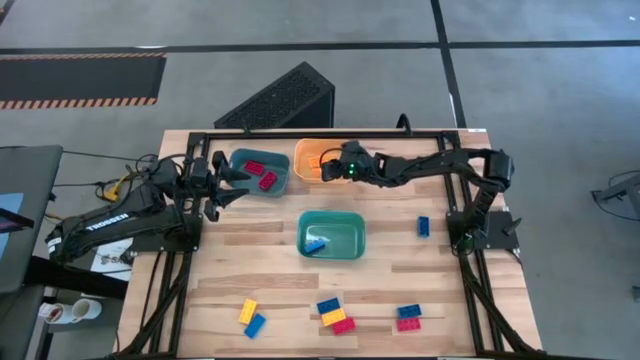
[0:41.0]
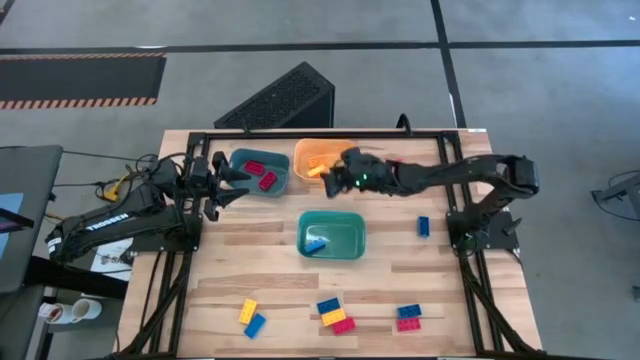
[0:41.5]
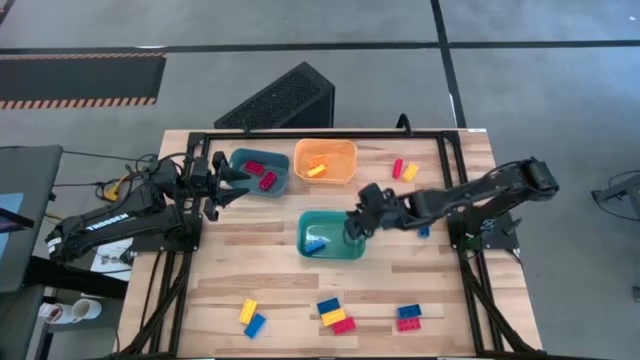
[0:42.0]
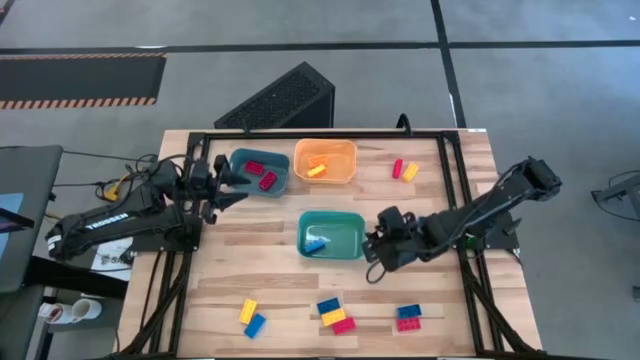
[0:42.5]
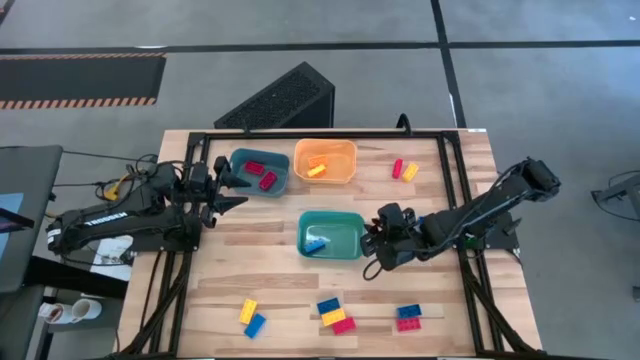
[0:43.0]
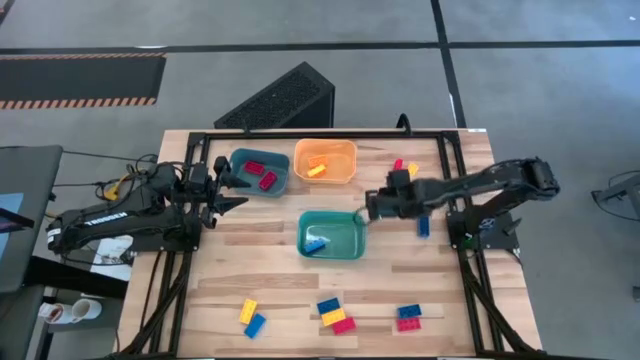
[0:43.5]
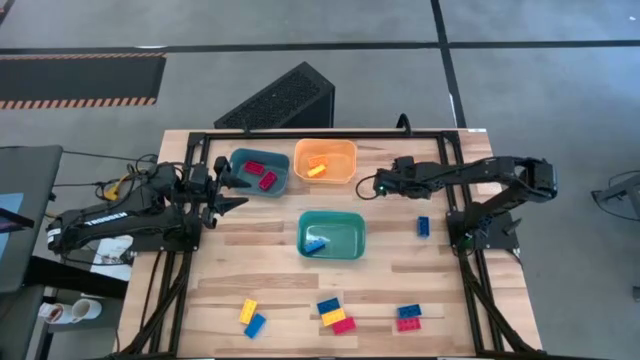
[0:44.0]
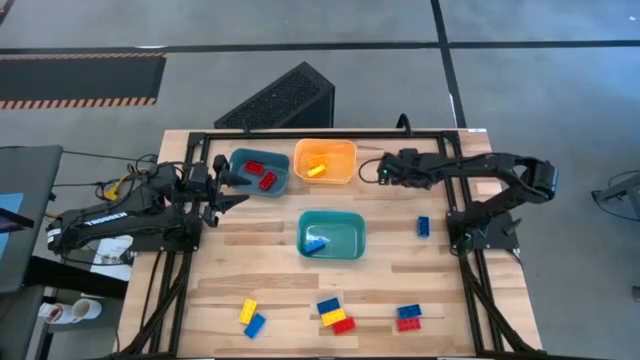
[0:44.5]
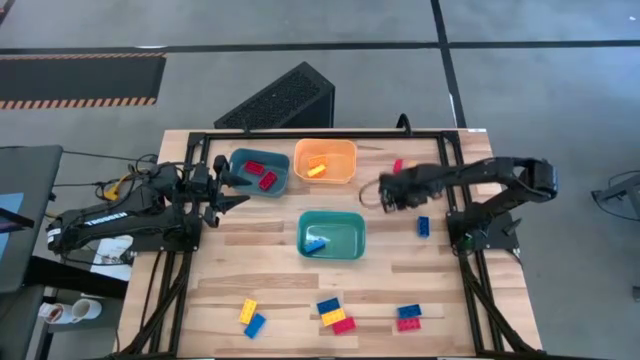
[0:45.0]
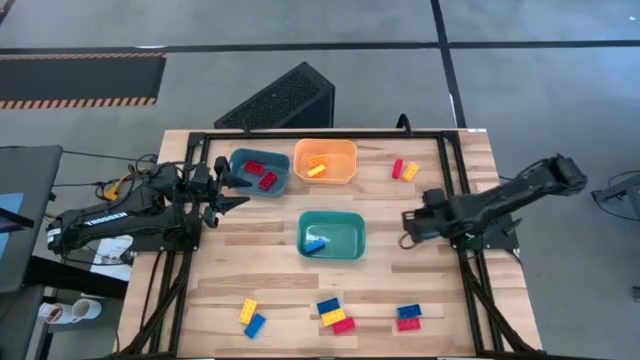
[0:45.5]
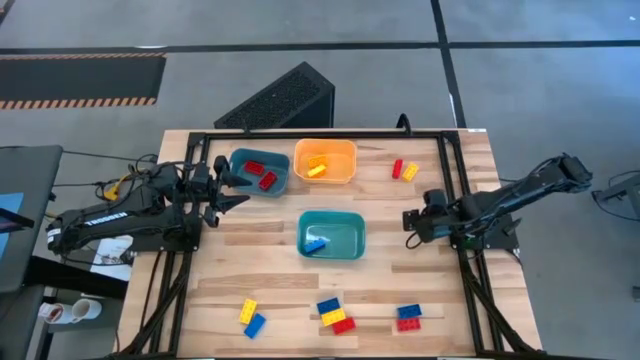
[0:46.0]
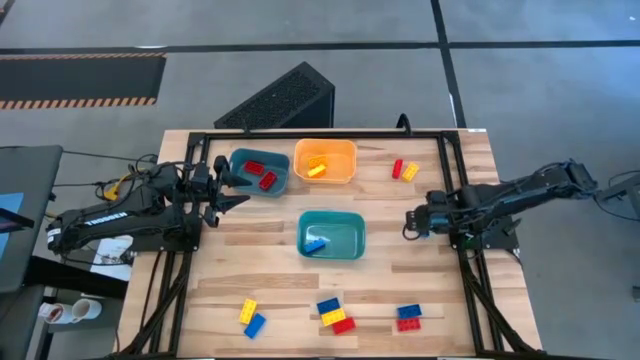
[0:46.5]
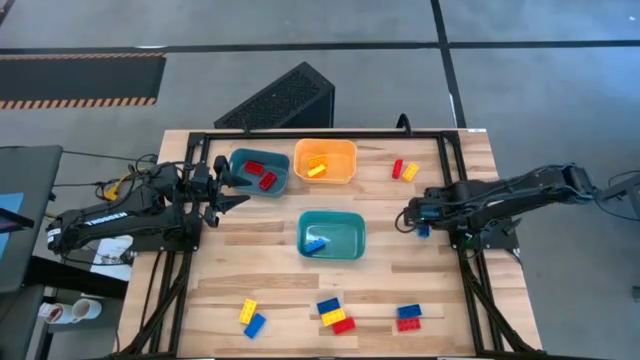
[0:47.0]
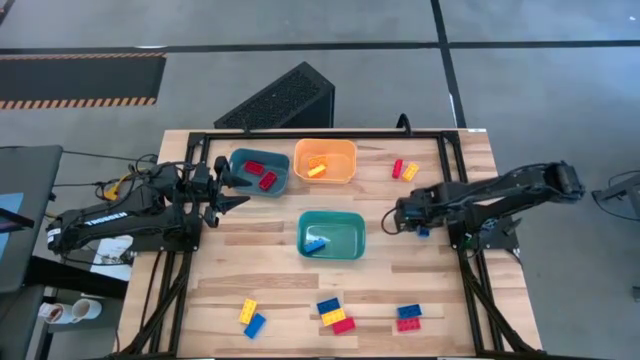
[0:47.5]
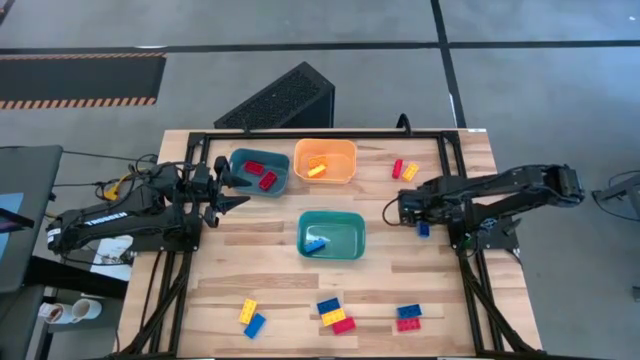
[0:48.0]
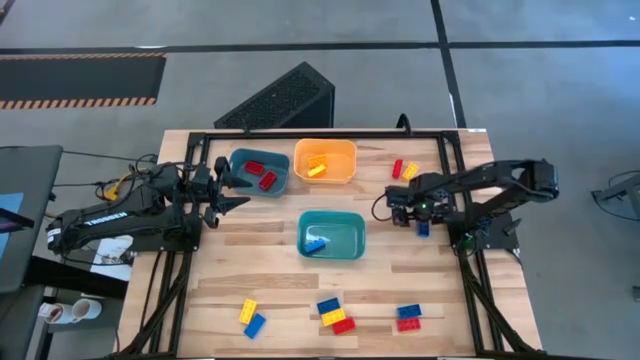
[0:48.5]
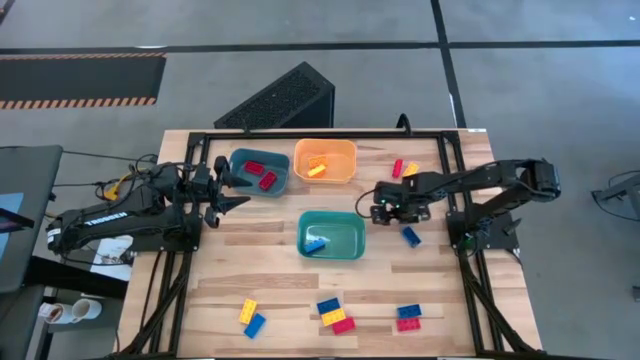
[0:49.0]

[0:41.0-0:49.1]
Task: Sort & place blocks by color
Put the blue game piece into the green bin

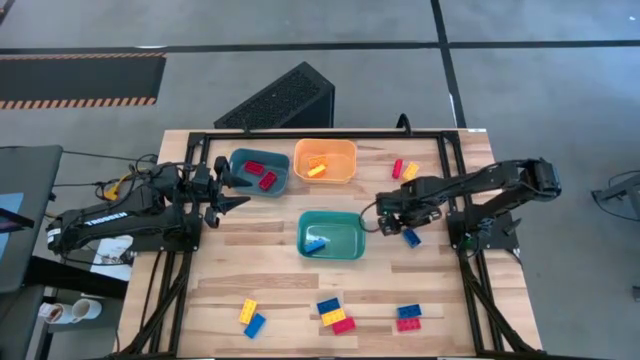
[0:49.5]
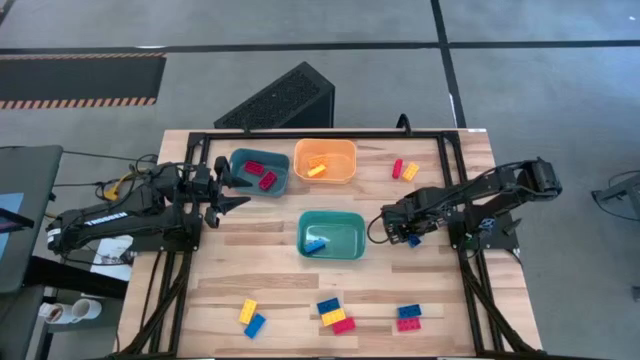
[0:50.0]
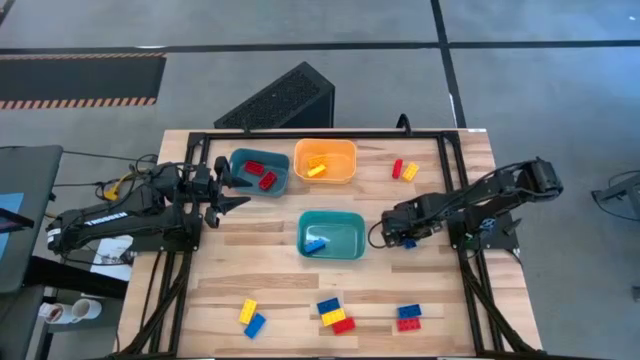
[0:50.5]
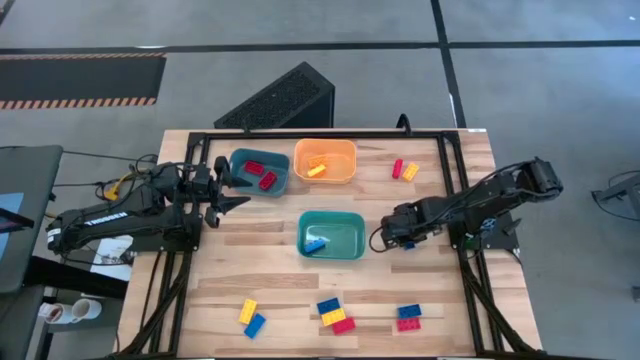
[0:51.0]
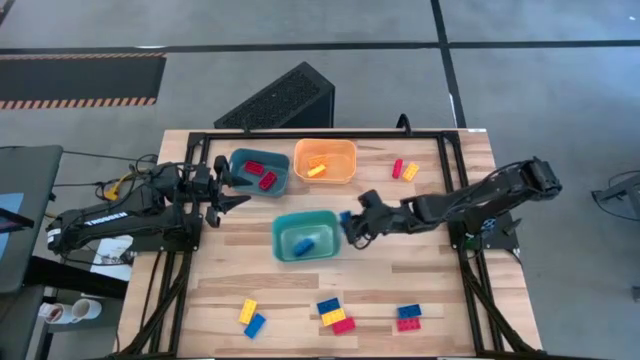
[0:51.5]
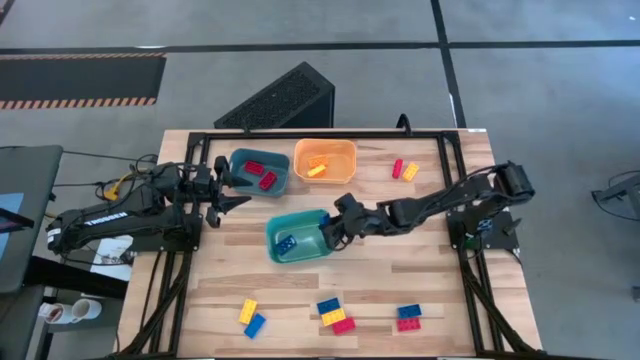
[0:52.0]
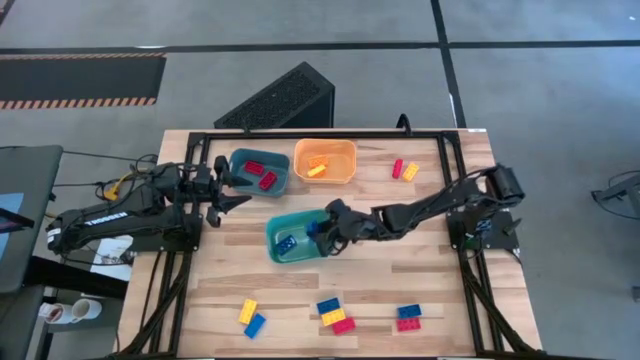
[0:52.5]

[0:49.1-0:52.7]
Put the blue game piece into the green bin

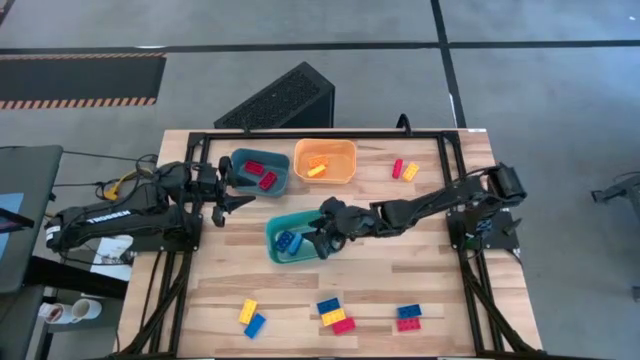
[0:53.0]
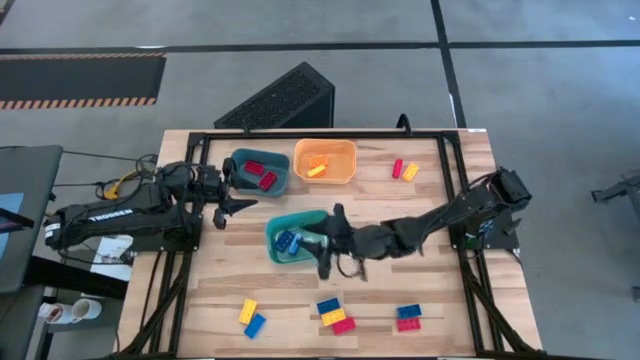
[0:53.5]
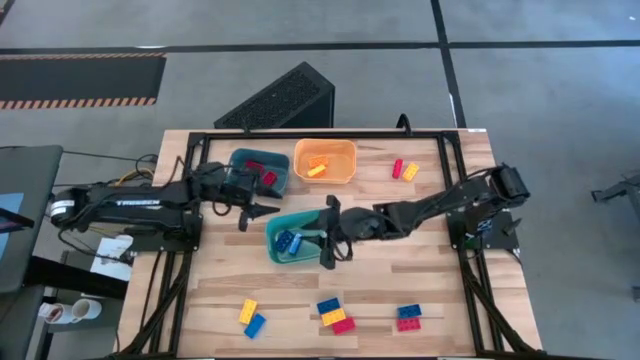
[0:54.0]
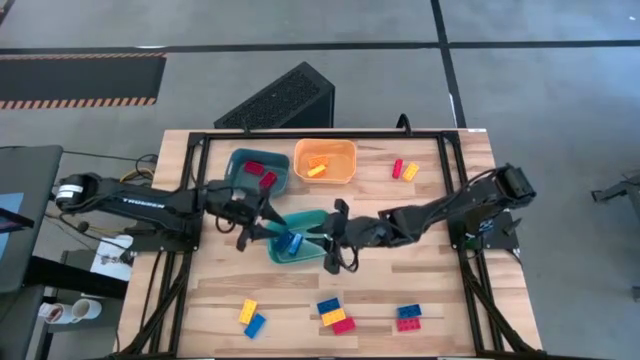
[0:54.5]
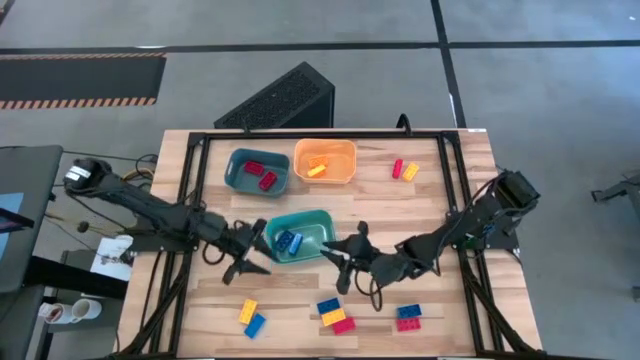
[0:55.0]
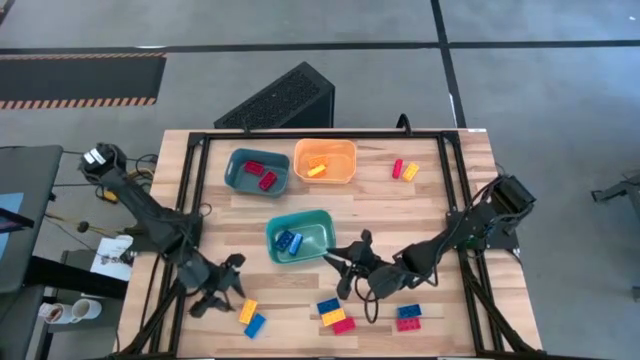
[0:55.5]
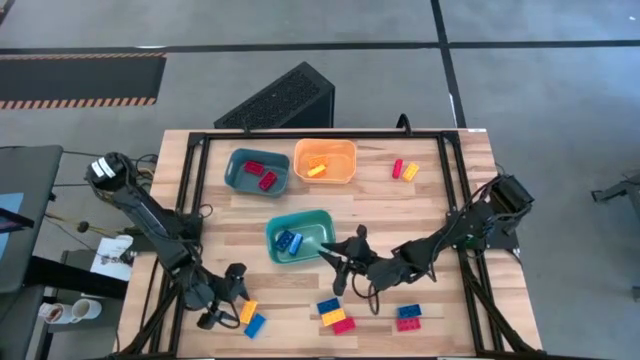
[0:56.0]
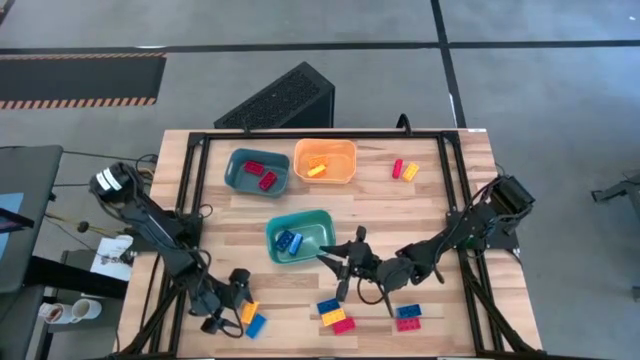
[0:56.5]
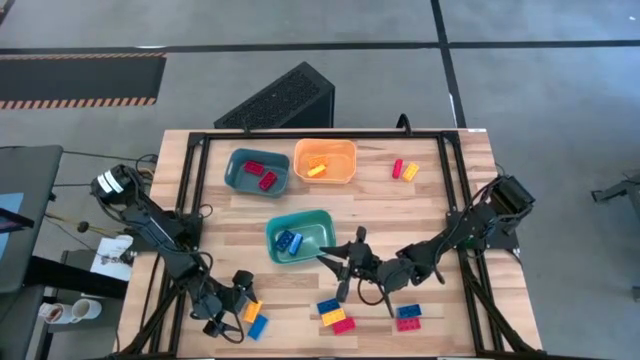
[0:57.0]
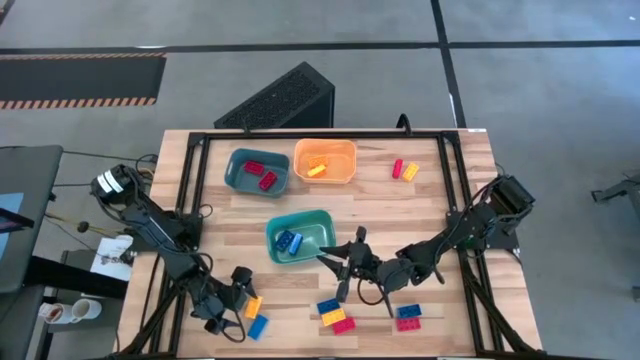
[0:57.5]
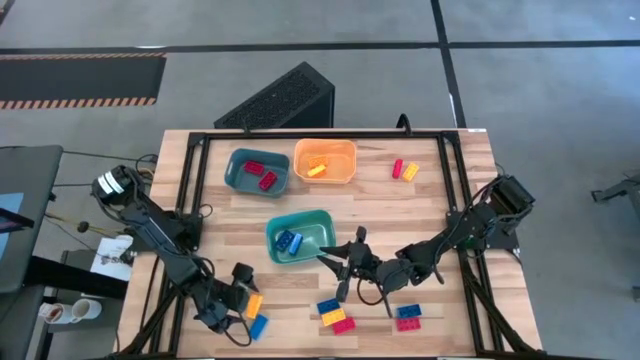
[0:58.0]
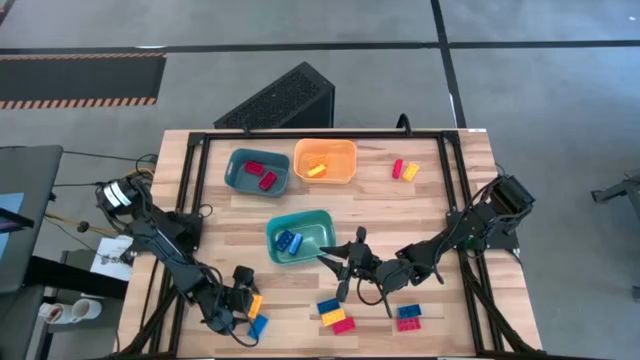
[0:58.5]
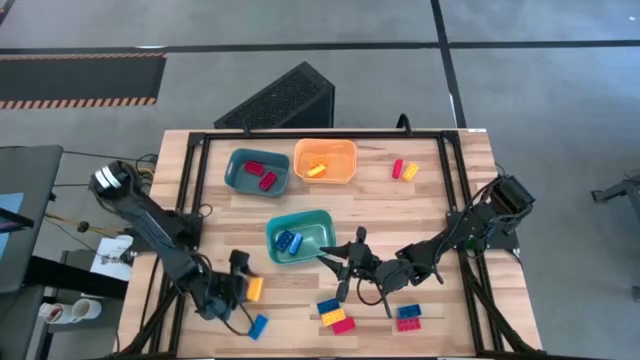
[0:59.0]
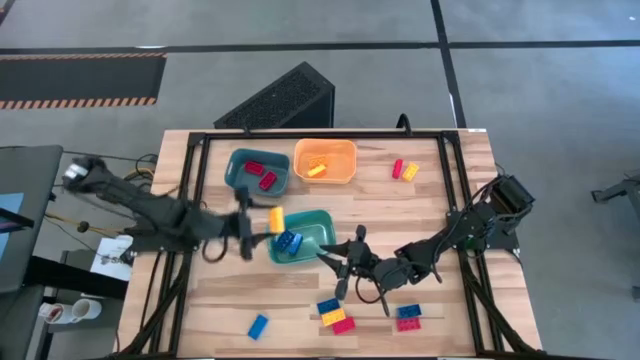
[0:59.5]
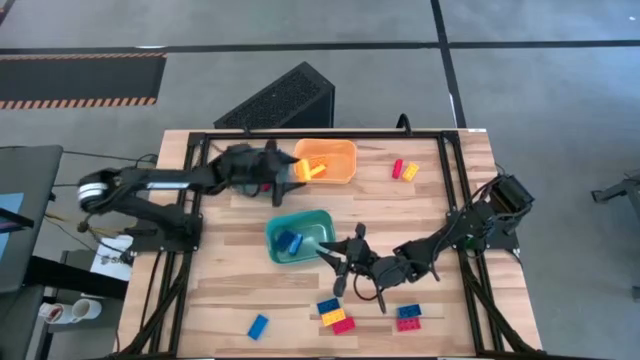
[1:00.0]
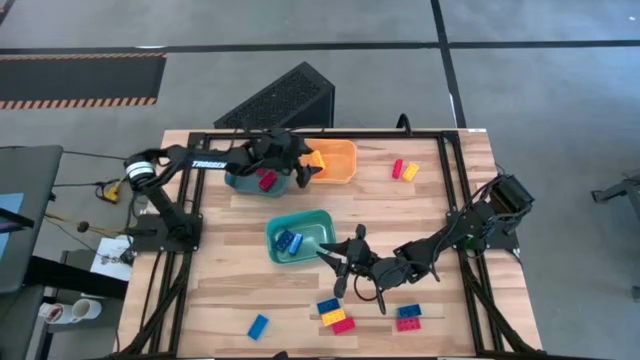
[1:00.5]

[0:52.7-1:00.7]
Put the yellow game piece into the orange bin

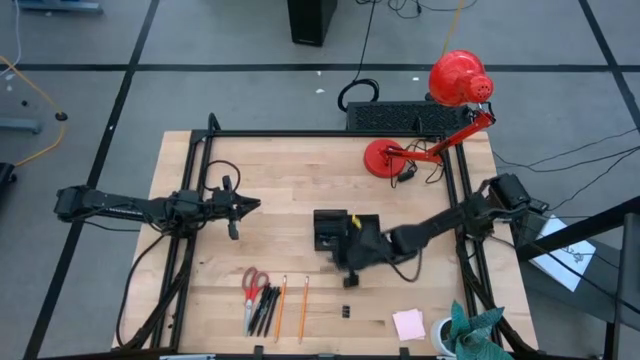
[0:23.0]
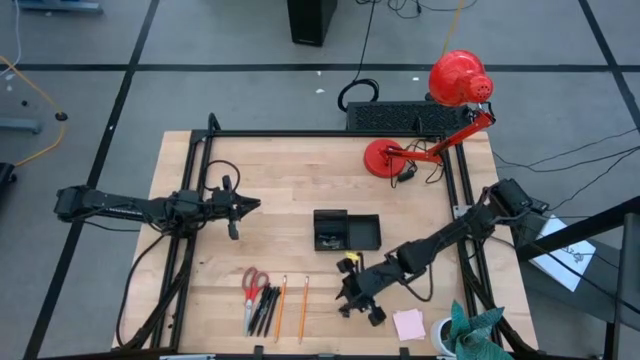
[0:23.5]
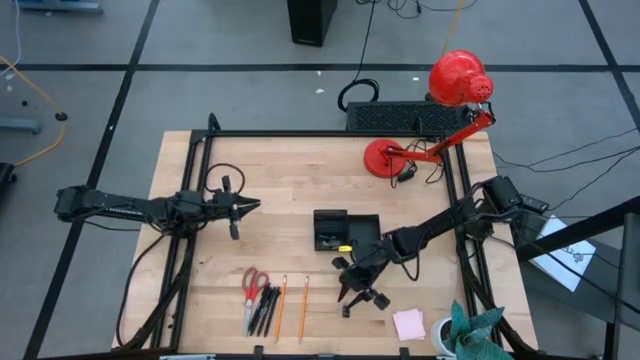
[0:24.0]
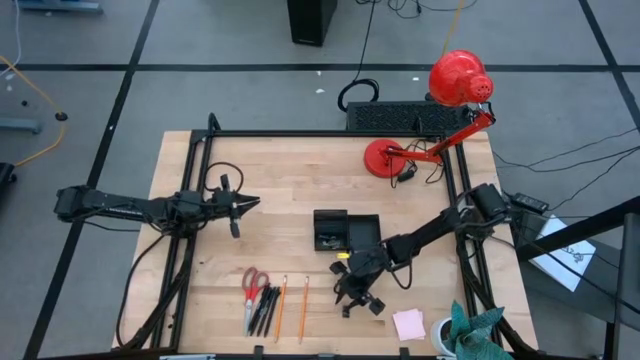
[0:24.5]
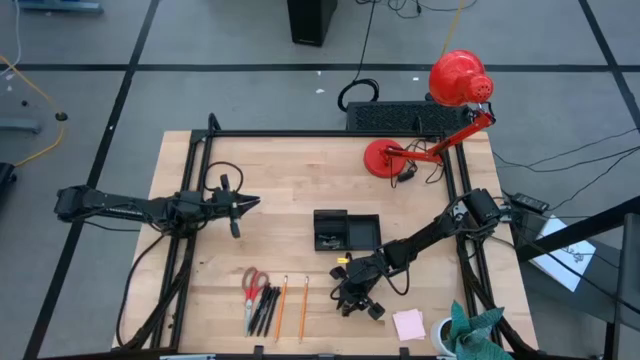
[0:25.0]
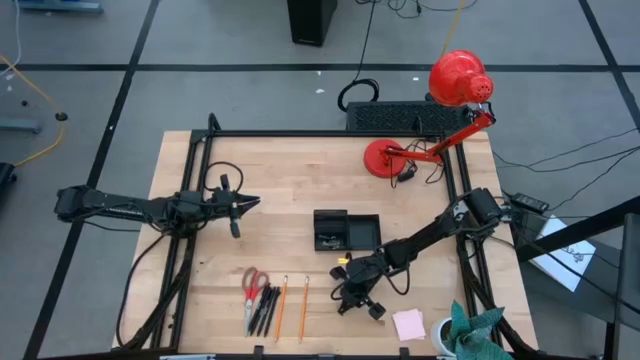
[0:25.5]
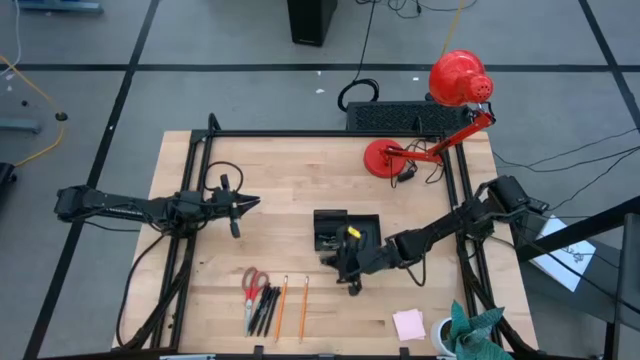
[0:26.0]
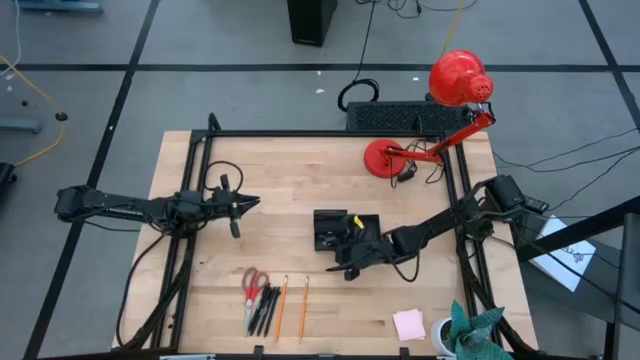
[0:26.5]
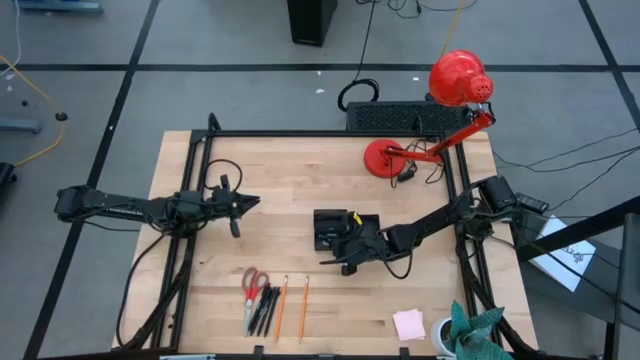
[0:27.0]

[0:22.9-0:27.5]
Task: Pick and place office supplies into organizer
Put the binder clip into the desk organizer
